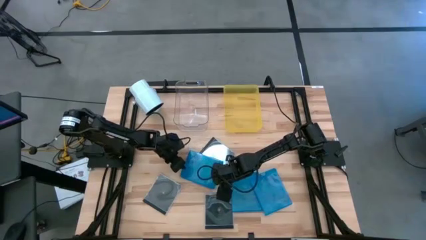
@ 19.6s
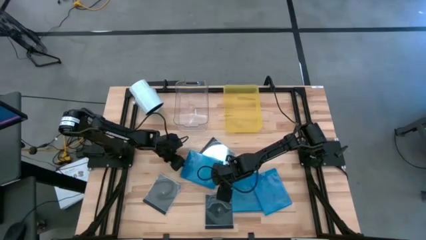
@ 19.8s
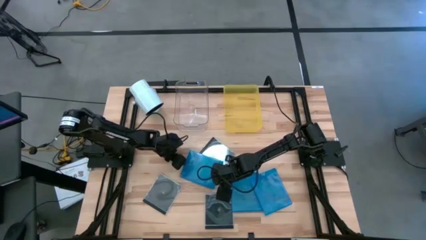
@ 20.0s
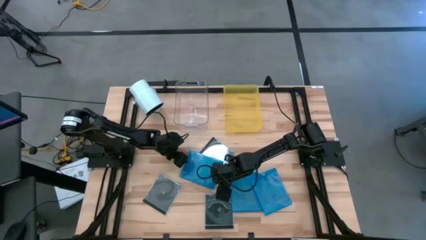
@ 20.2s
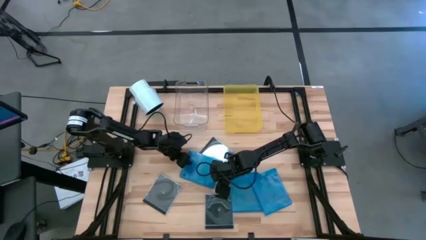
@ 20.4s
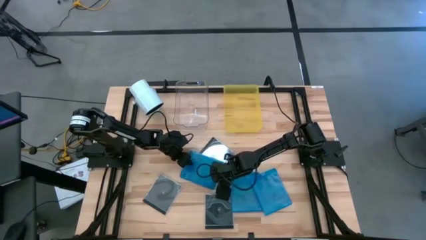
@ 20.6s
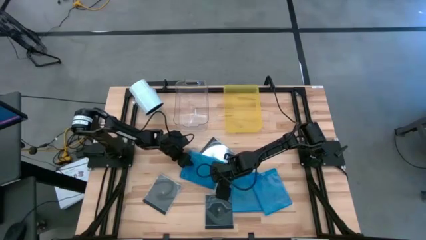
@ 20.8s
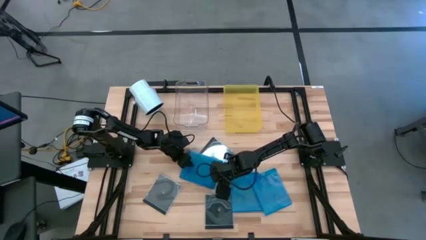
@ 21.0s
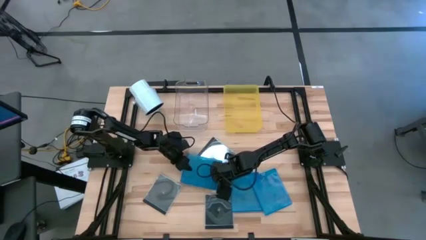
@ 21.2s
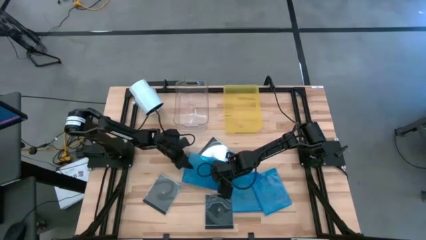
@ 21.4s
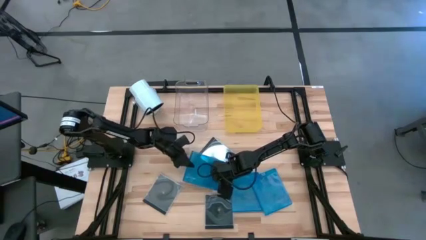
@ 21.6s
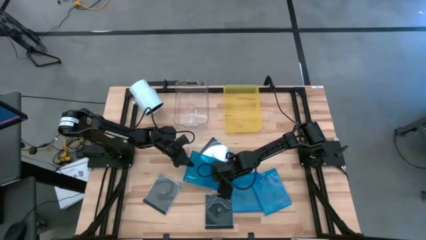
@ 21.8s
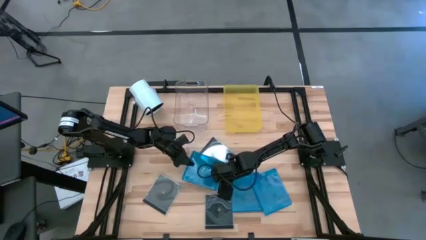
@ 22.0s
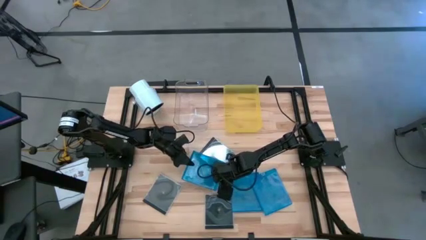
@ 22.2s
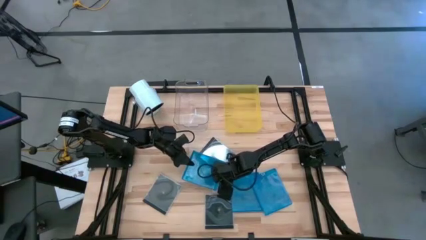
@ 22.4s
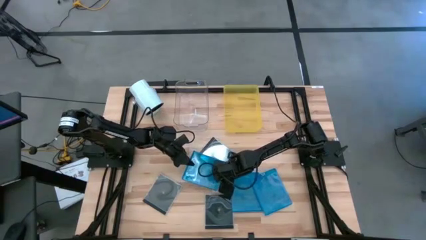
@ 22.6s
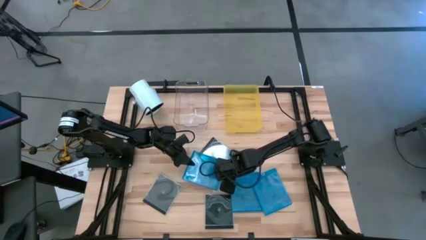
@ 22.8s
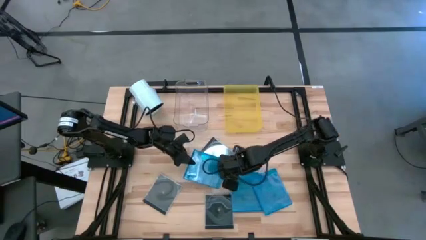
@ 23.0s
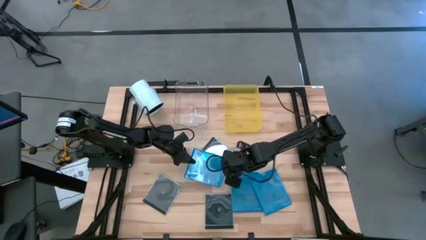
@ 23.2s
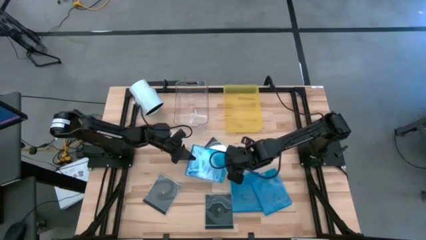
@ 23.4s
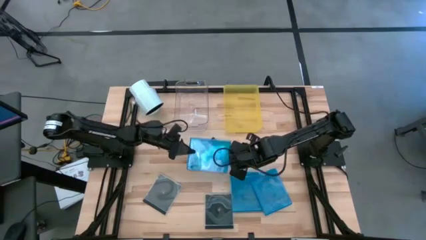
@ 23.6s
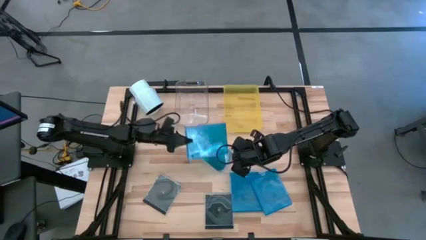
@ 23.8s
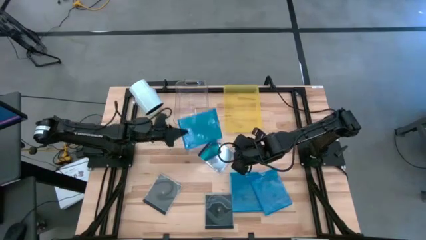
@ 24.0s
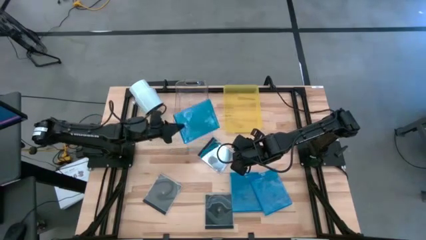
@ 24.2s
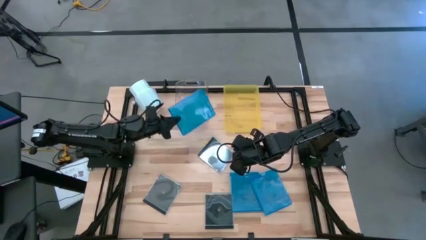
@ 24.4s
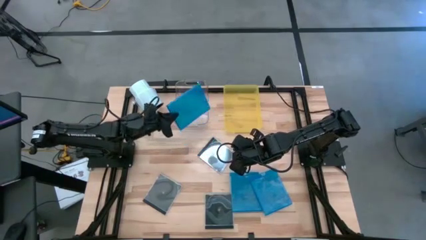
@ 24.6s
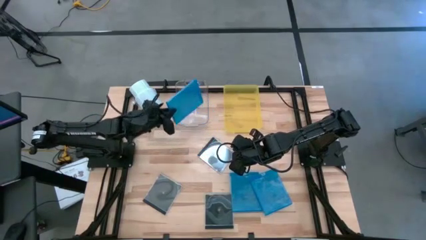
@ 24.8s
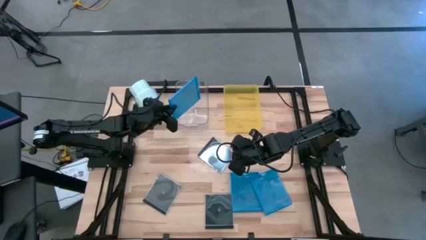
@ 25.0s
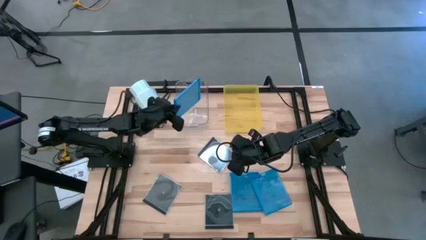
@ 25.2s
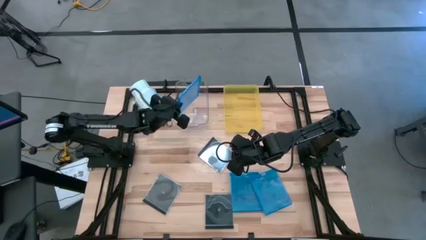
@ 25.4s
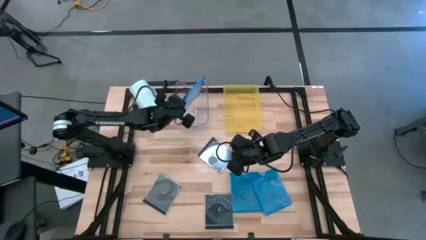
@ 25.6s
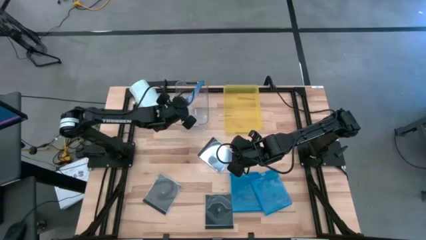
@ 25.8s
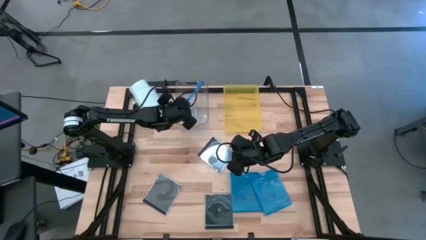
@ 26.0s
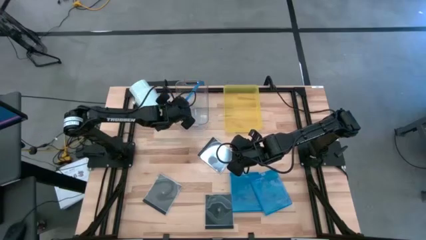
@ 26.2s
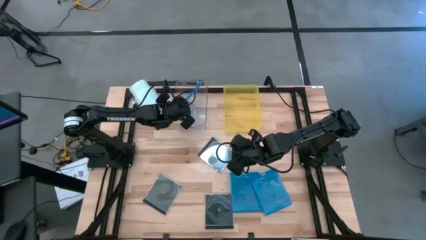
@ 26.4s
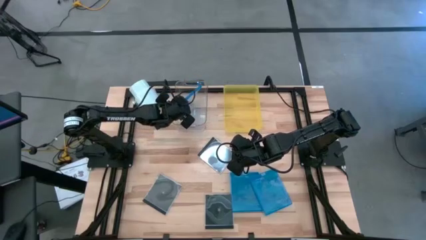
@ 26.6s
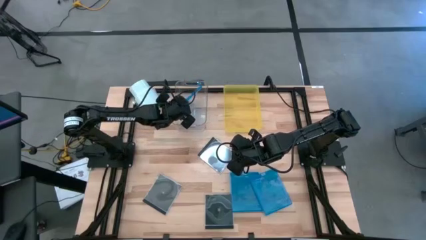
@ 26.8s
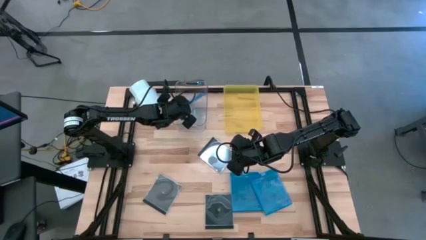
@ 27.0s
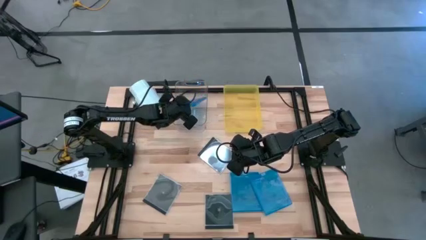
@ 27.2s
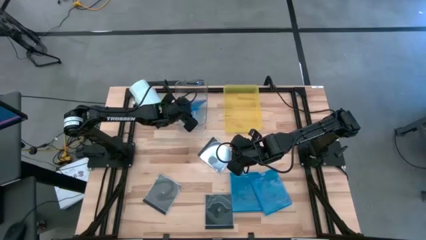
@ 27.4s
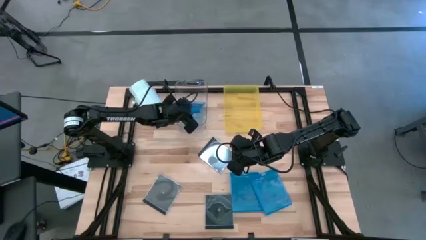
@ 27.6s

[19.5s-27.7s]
Task: Pick & place jewel cases by type
Put the left blue CD case into the transparent bin

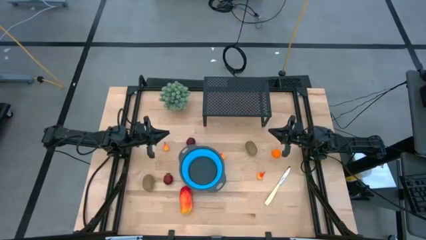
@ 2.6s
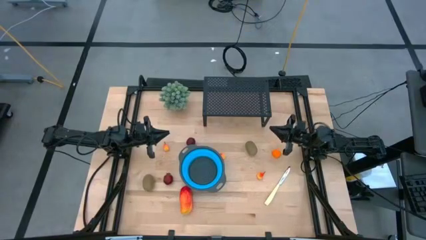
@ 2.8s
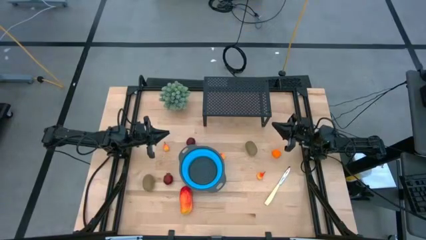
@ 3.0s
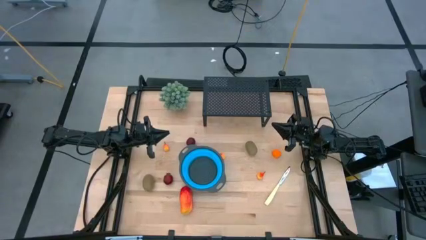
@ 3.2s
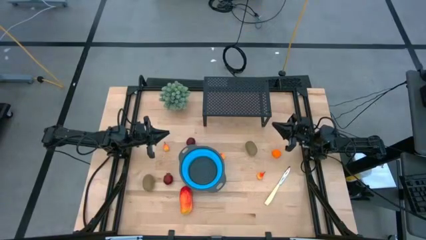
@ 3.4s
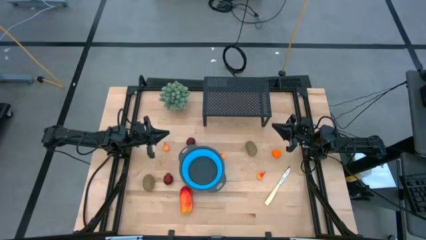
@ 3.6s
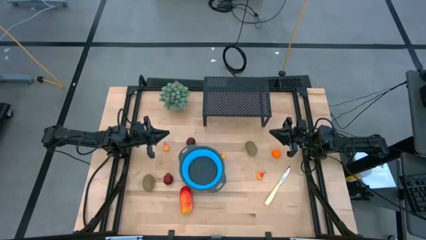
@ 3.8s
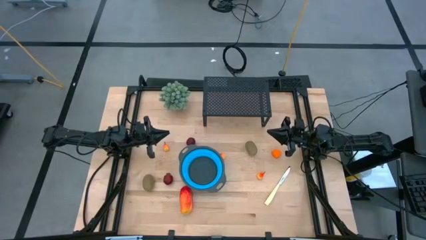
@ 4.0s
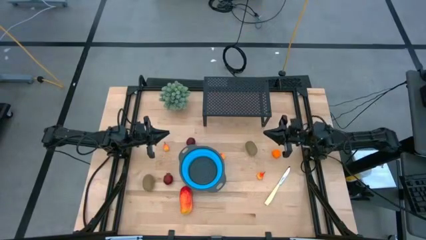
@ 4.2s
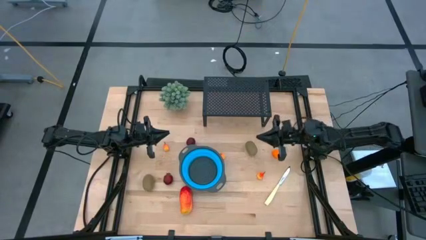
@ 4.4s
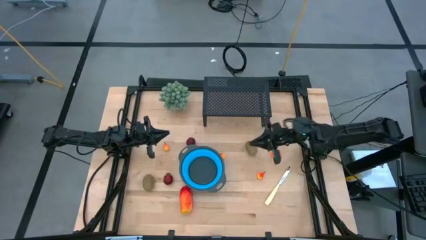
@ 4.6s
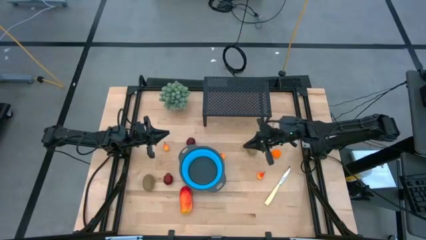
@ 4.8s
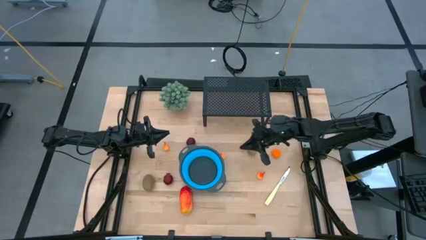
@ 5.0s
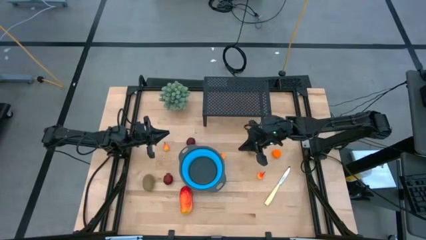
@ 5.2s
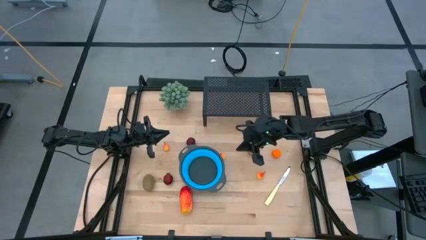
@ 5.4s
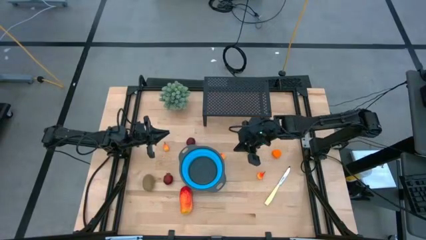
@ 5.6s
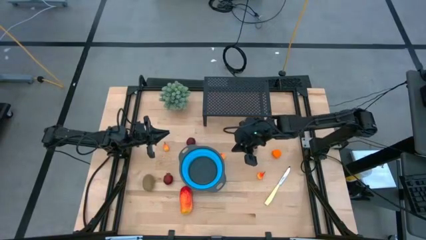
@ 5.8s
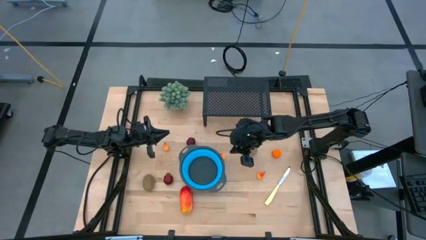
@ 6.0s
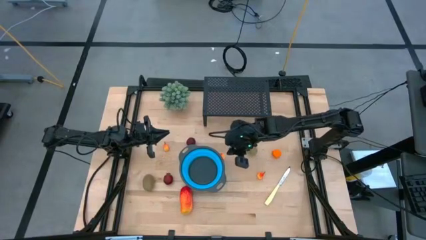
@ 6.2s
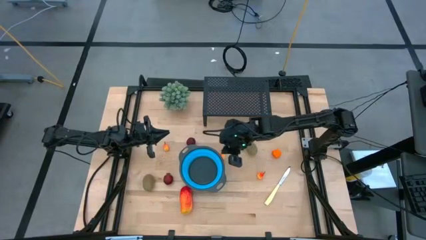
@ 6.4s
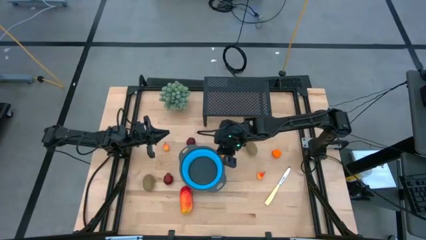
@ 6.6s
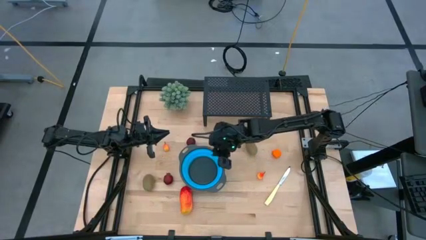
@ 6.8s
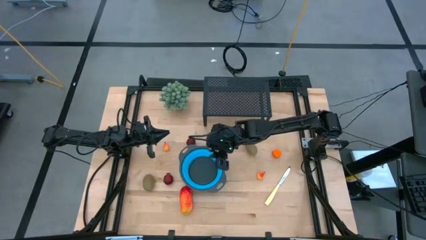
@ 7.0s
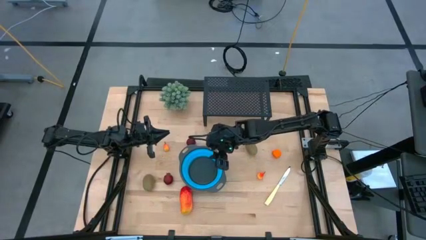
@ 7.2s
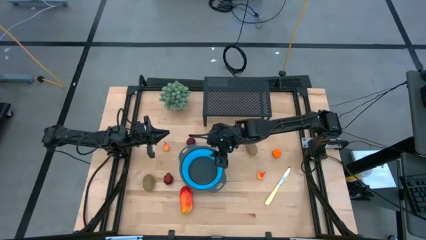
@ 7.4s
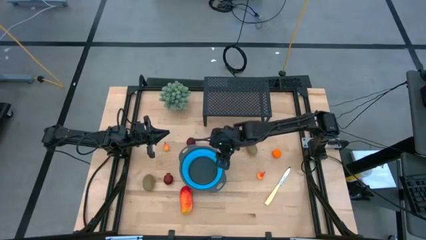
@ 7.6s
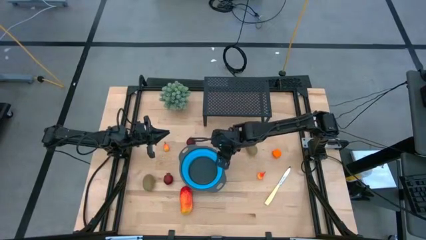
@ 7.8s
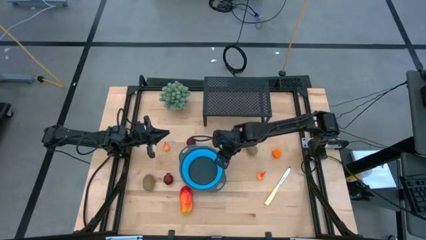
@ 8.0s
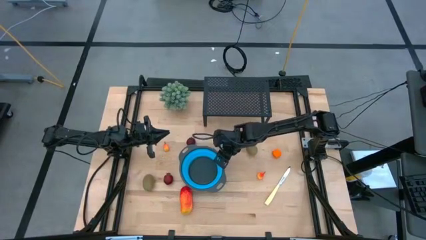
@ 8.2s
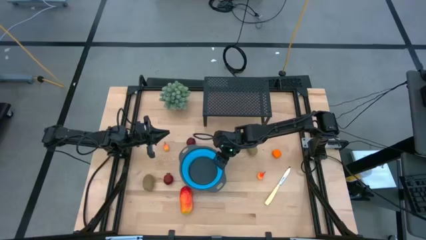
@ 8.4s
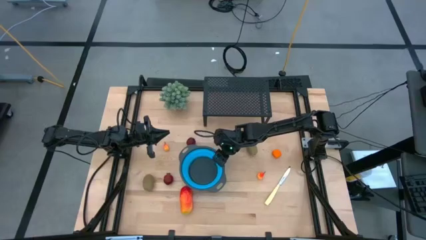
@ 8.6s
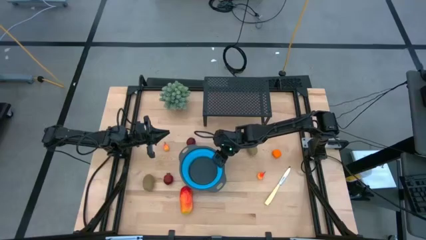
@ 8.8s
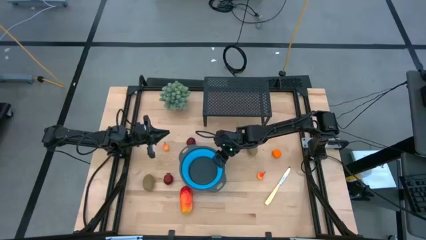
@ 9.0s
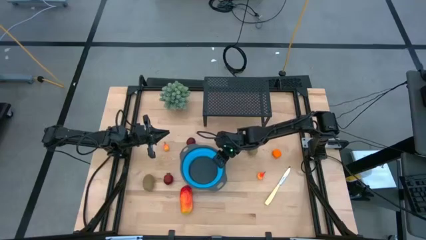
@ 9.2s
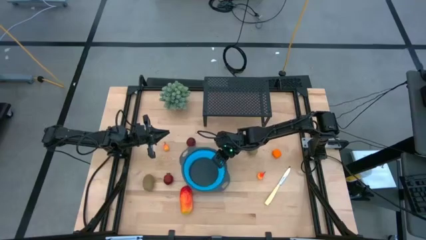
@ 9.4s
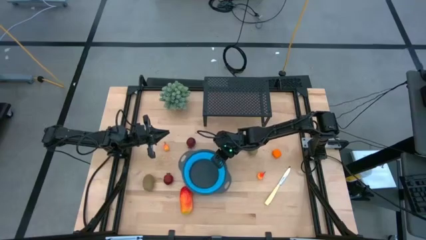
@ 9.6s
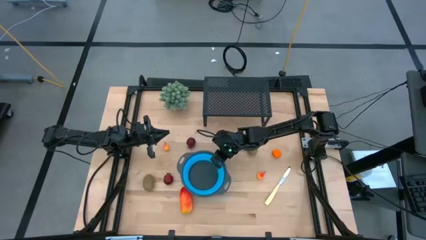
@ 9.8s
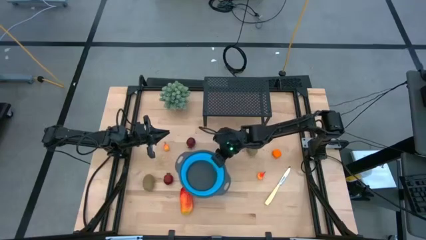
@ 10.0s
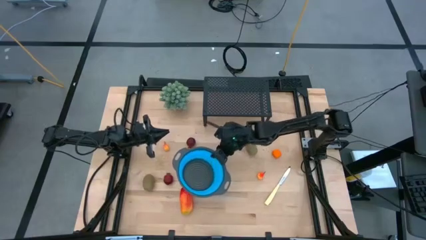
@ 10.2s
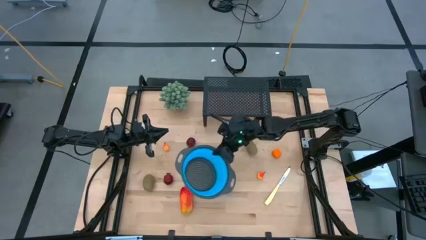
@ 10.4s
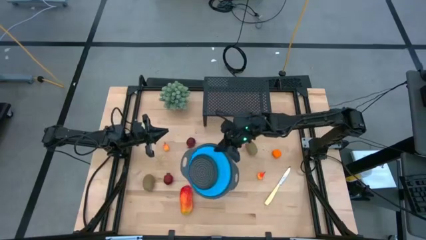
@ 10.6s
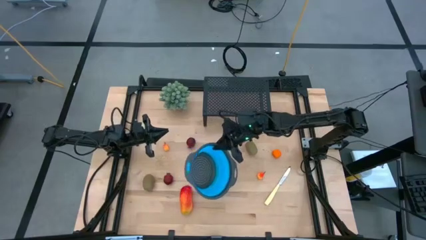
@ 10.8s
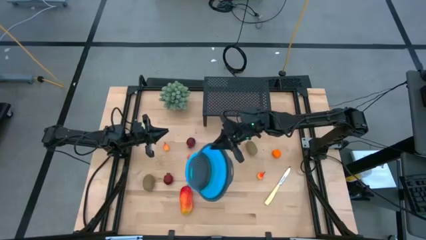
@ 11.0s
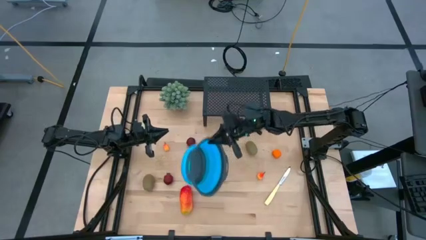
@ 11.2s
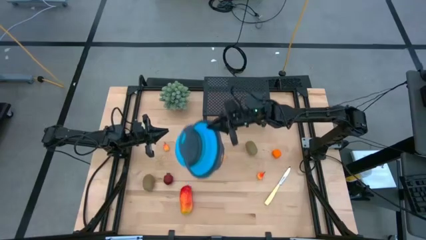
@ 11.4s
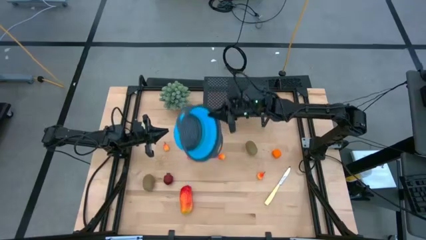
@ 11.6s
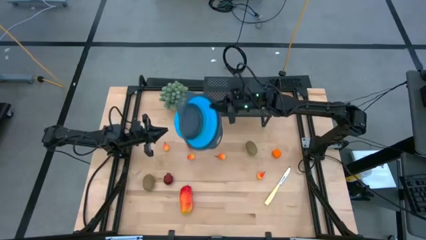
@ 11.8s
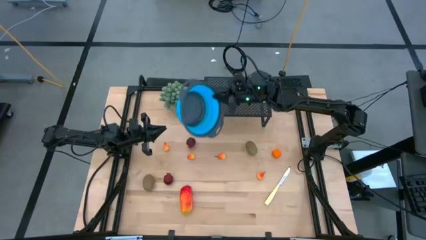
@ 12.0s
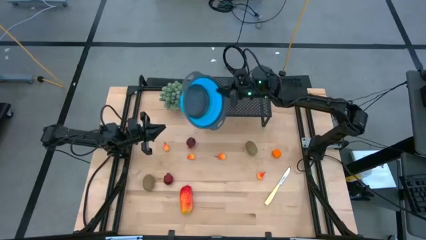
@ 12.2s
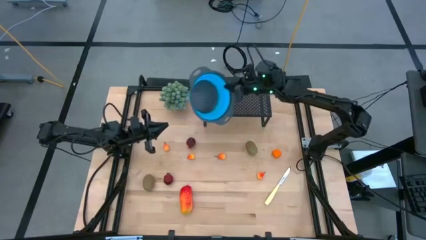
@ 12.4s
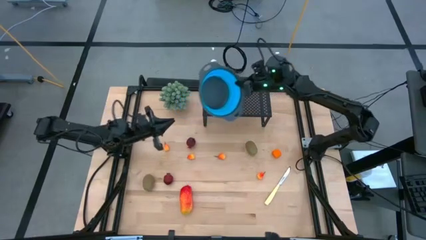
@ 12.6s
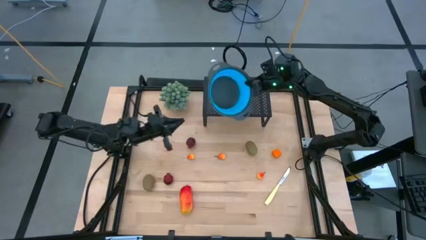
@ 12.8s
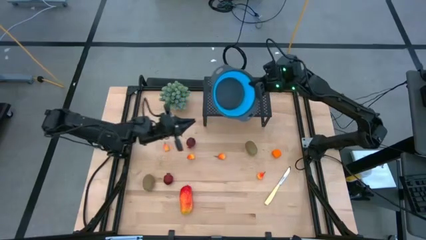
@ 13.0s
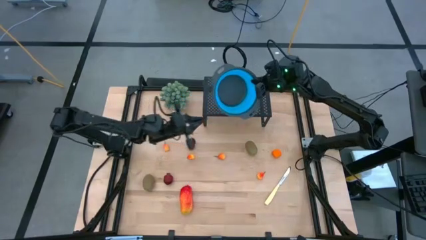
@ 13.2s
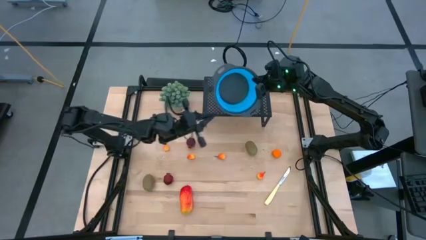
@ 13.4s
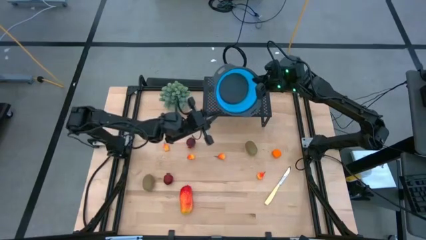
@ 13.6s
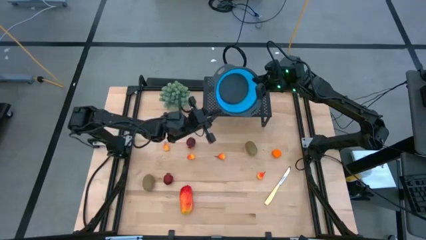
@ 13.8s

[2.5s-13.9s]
Task: Pick & Place Fruit
Put the blue strainer bowl on the shelf
